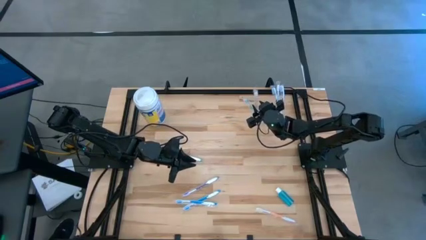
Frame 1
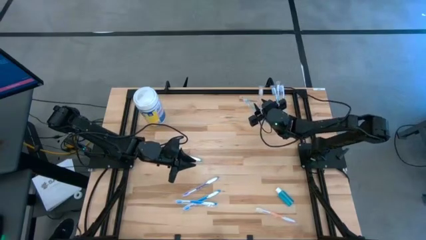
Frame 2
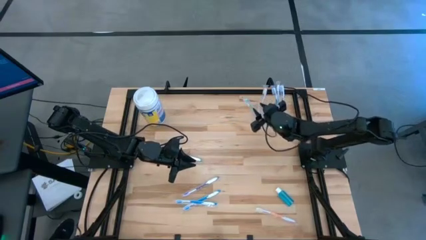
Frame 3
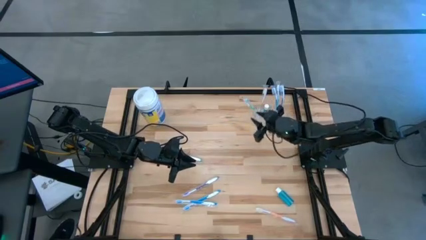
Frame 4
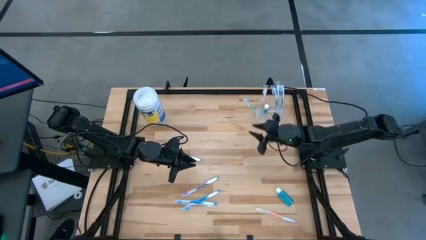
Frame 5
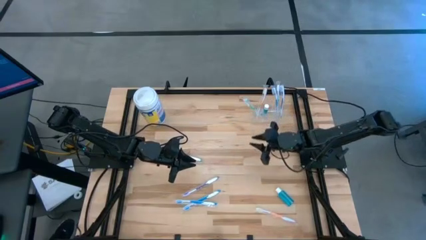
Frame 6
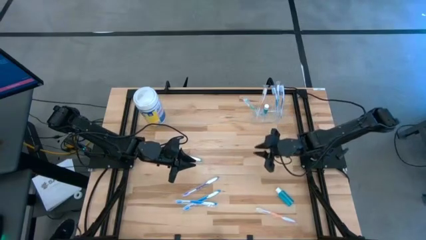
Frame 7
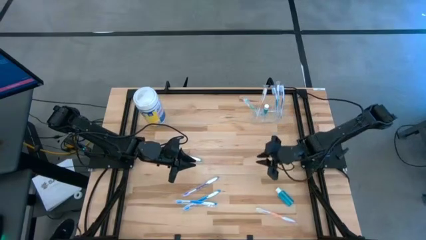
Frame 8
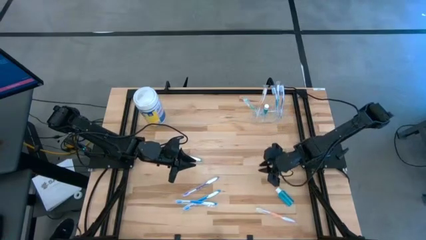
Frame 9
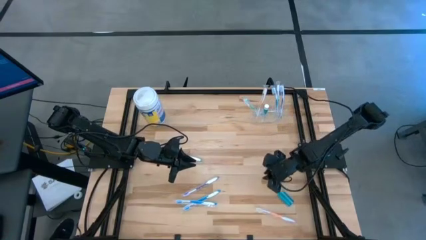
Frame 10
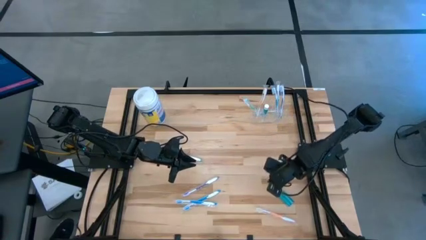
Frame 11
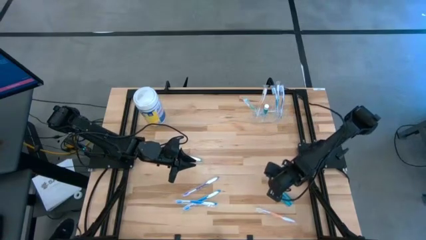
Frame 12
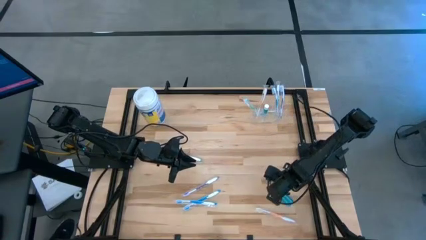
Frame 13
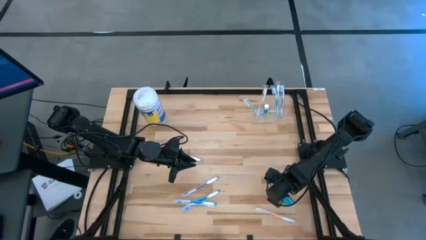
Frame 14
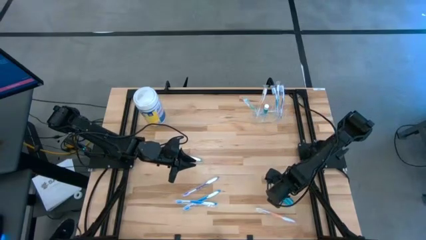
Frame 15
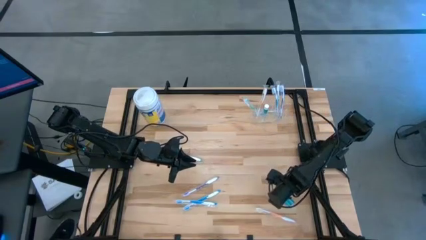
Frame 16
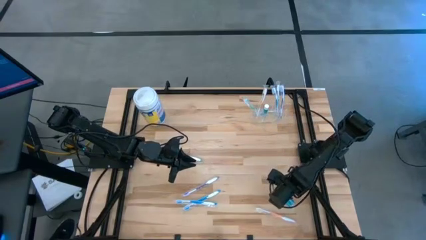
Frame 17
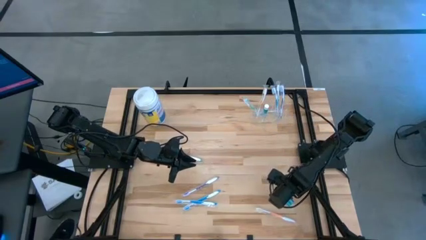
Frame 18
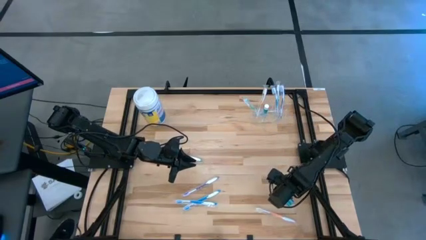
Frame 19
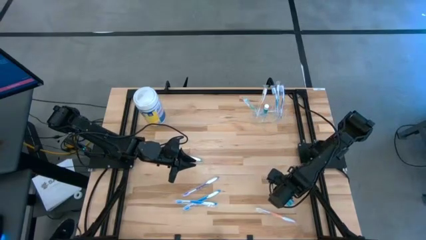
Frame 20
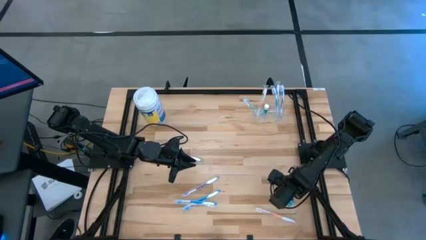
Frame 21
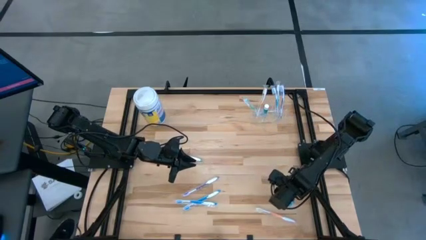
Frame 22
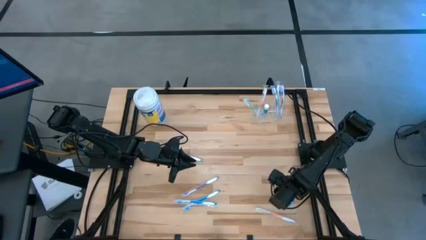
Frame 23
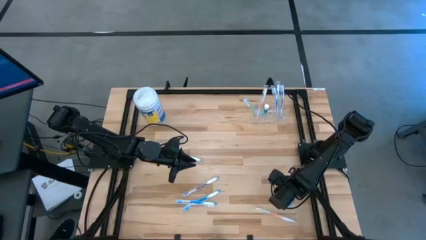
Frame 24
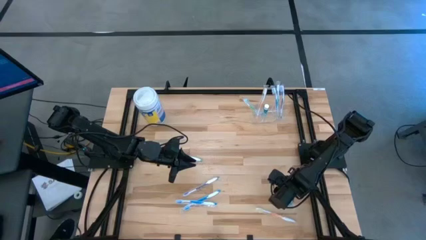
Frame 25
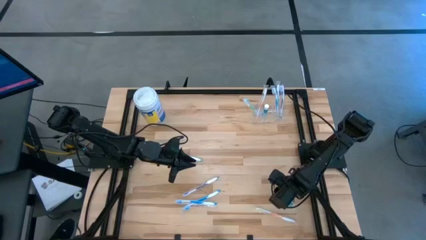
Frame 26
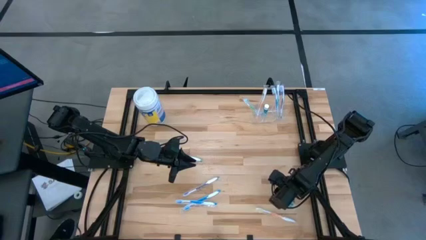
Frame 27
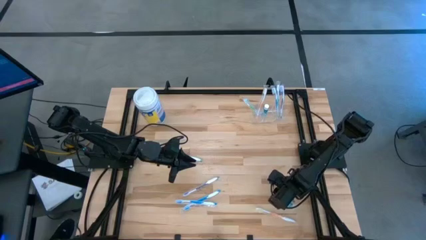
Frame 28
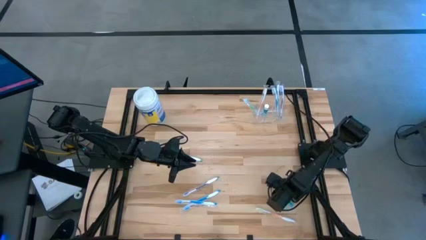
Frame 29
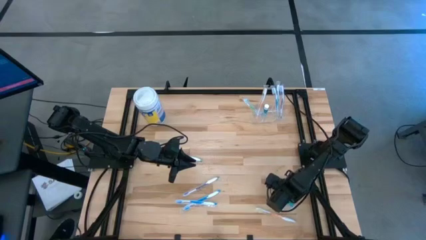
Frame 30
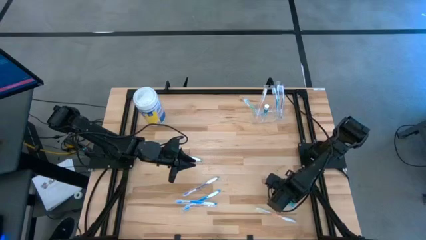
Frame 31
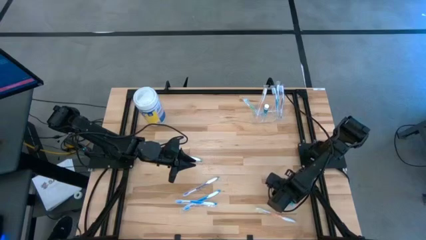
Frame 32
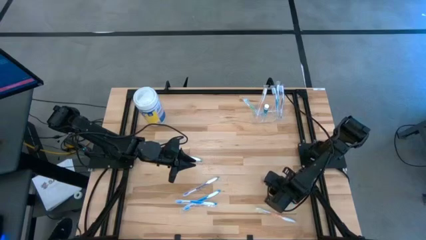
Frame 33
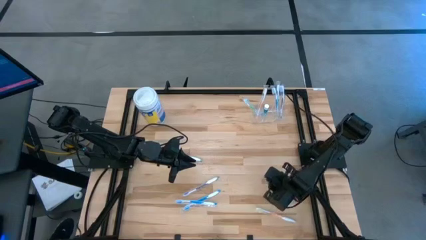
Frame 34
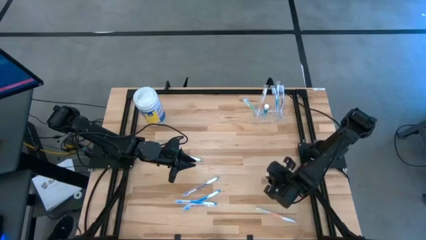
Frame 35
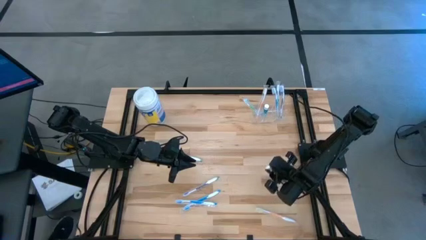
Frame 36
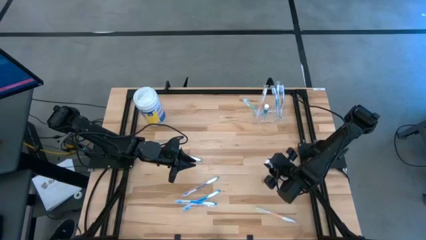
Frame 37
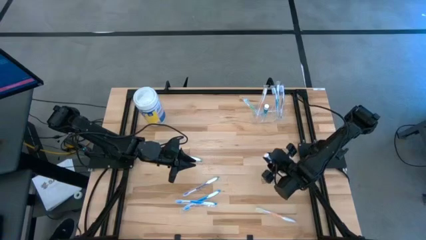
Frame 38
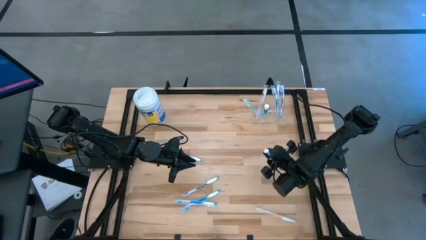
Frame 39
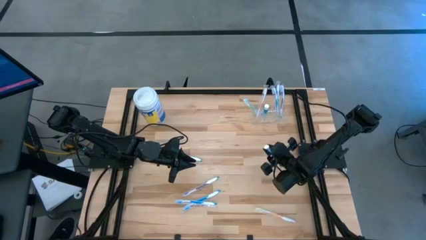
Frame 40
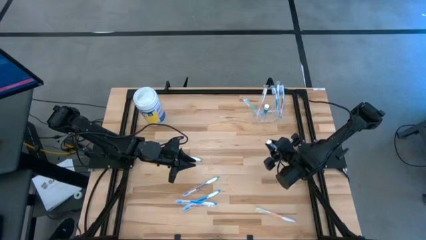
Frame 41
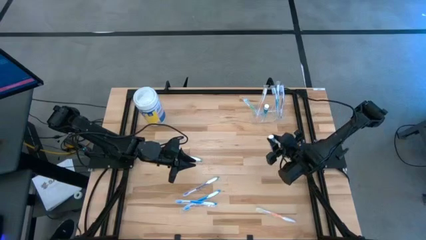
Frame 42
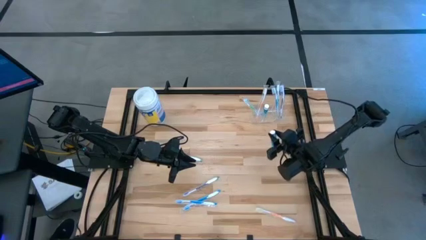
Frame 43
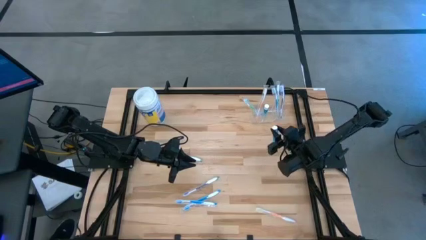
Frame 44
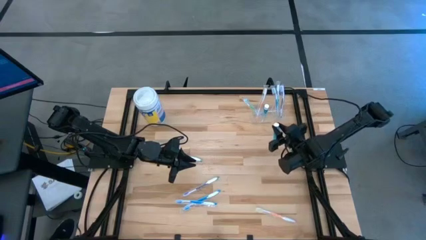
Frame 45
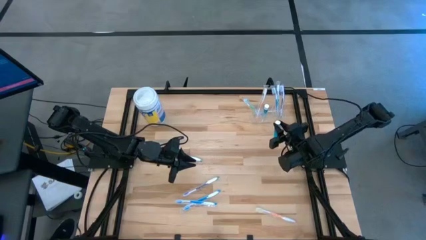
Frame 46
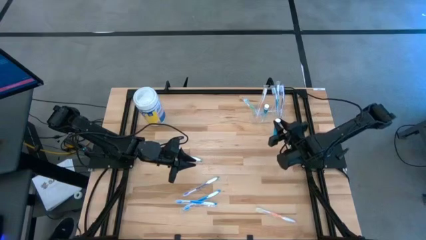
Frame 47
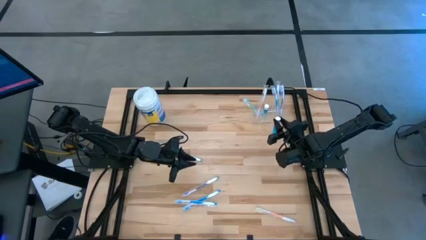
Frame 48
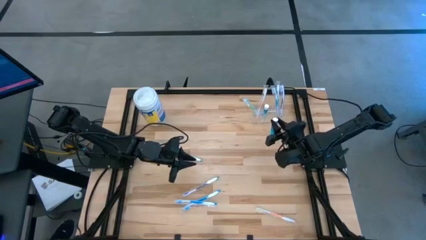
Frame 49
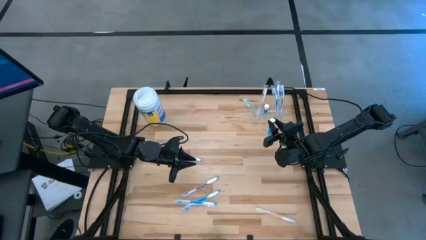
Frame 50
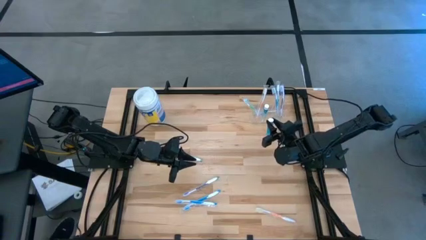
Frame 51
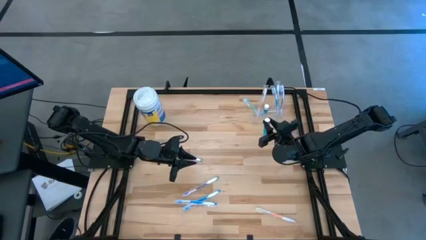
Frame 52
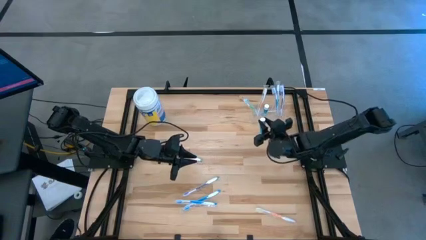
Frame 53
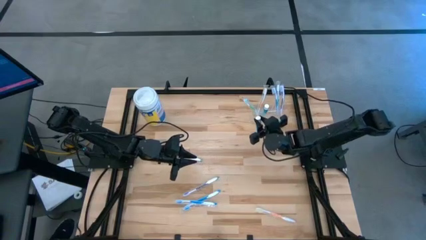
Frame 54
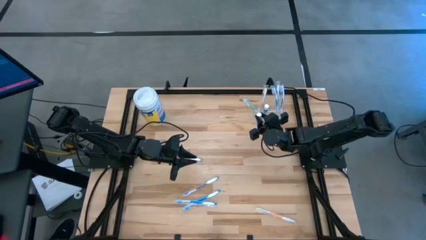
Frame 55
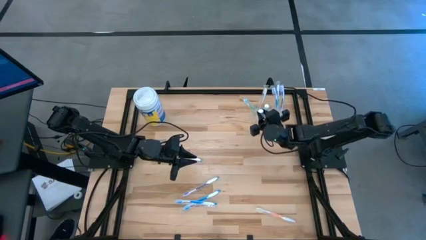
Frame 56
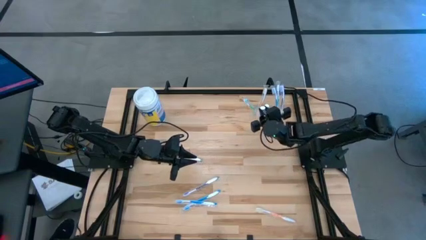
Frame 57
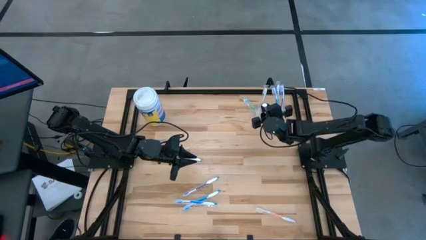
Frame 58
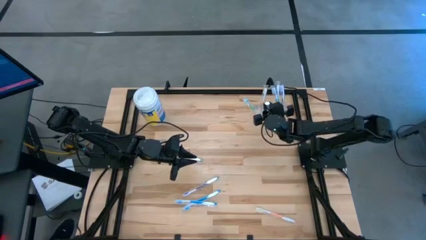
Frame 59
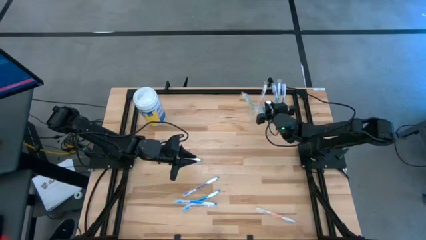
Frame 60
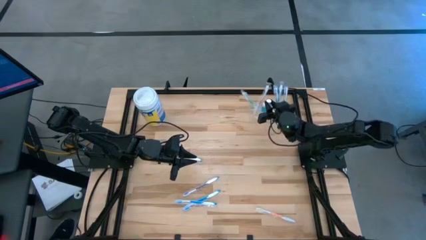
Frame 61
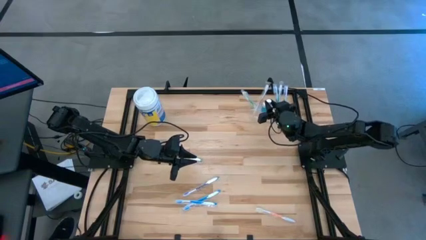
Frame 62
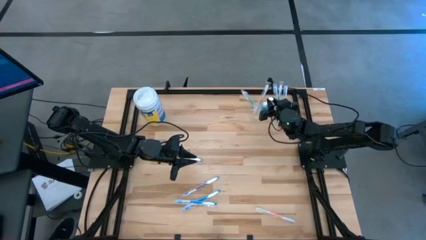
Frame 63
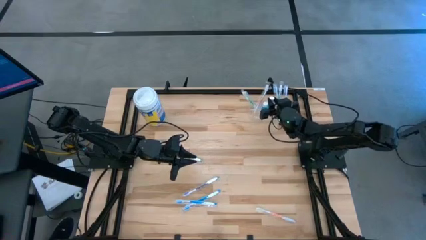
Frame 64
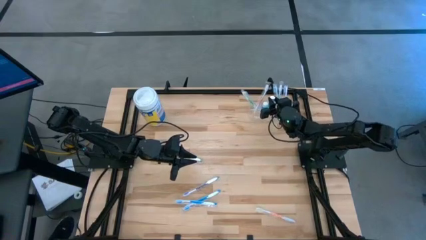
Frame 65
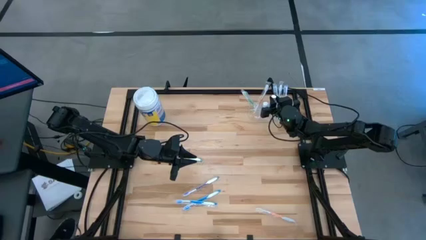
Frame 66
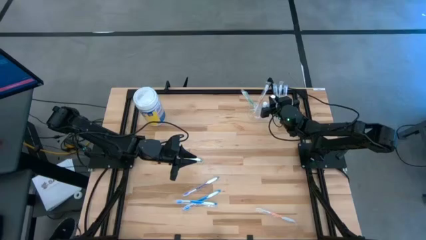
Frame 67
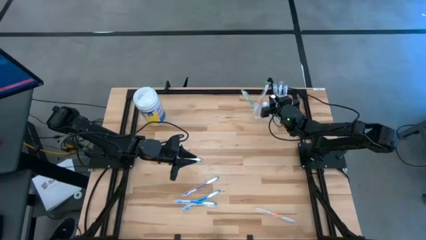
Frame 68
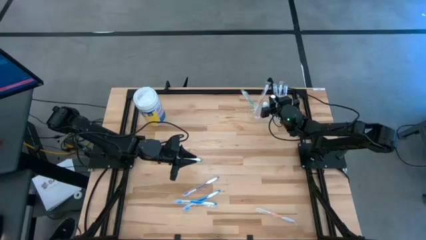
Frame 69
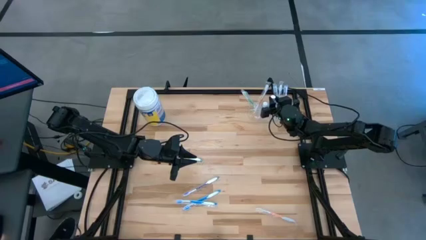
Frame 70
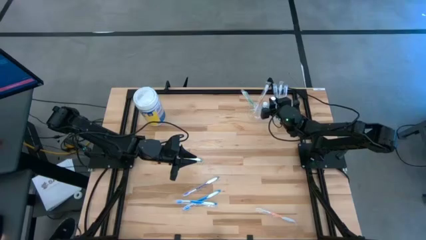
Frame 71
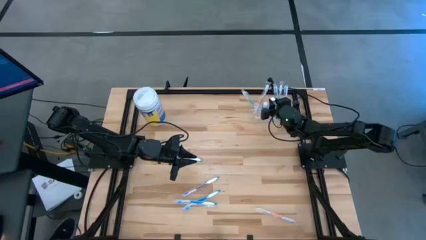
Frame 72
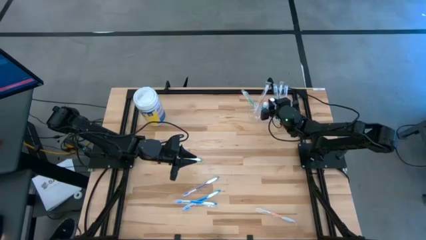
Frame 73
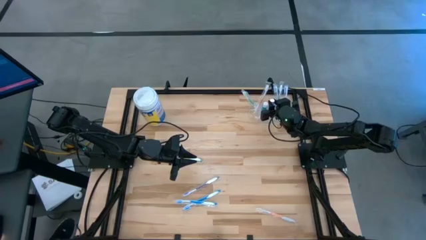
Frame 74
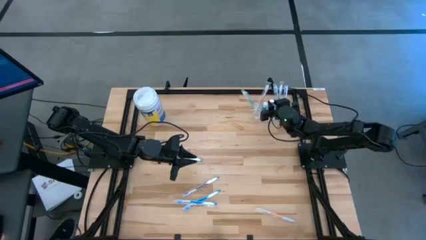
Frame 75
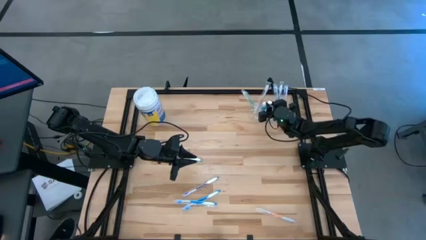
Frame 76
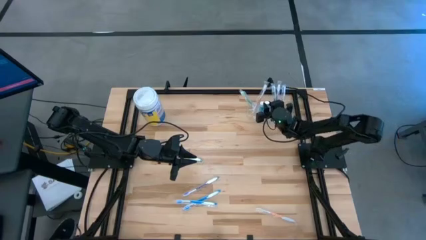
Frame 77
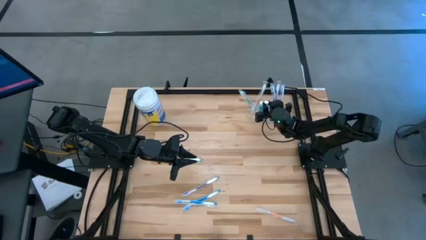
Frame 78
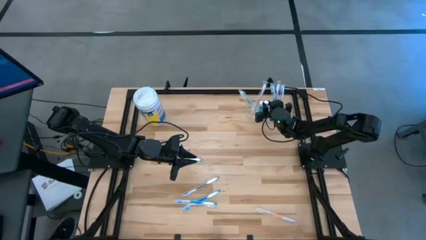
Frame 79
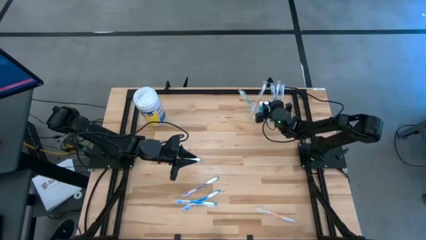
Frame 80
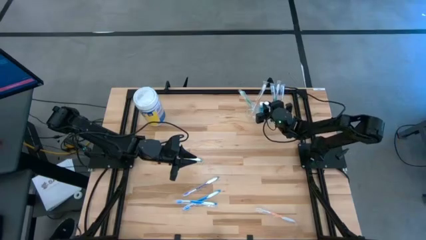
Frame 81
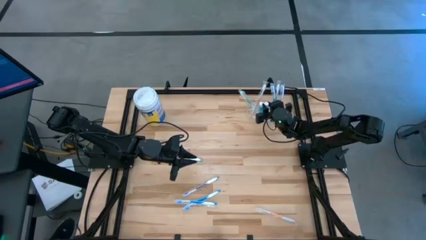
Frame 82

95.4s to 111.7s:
Task: Pick & Place toothbrushing station
Put the mouthwash bottle into the middle transparent organizer
